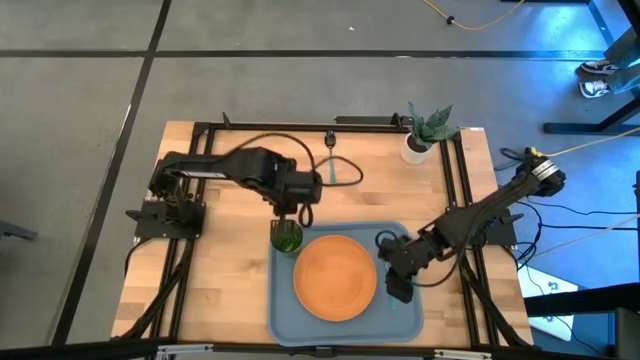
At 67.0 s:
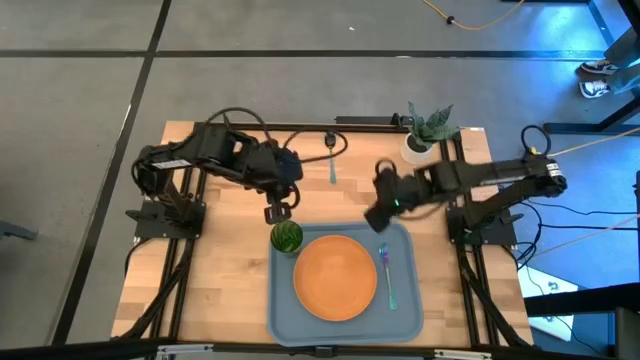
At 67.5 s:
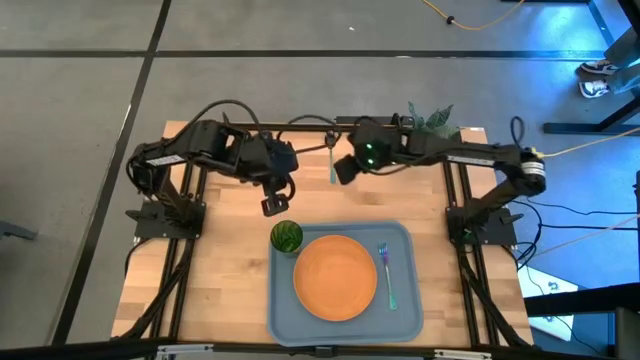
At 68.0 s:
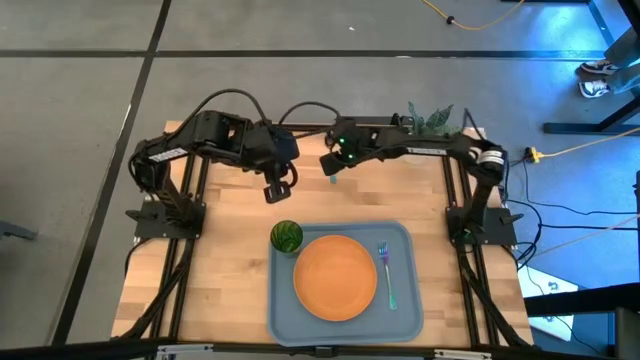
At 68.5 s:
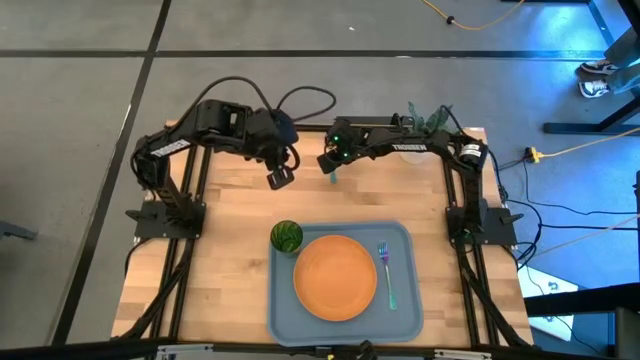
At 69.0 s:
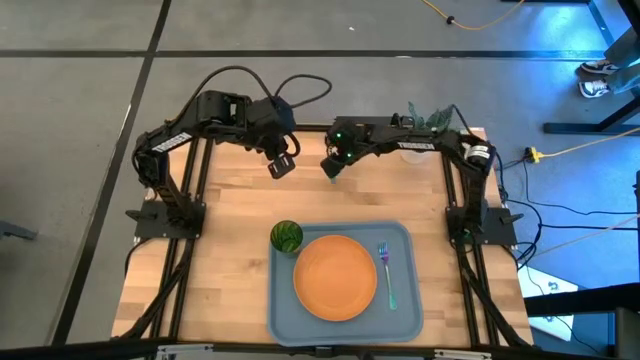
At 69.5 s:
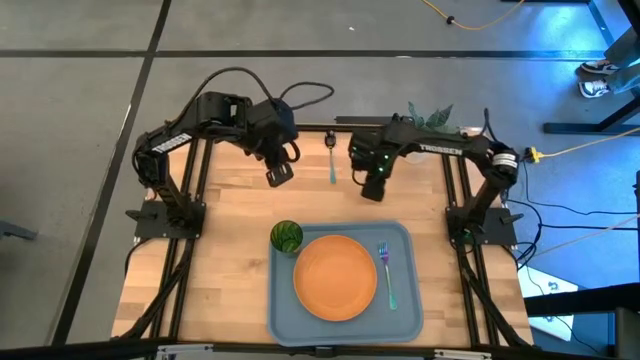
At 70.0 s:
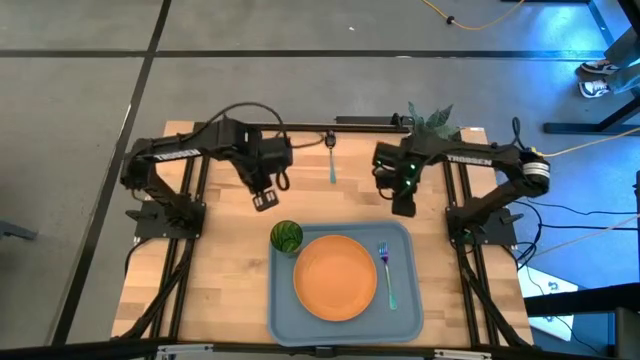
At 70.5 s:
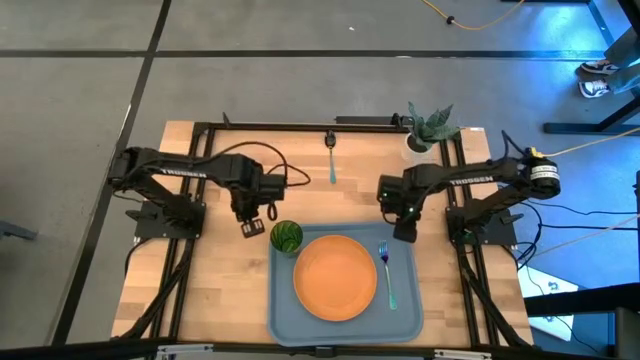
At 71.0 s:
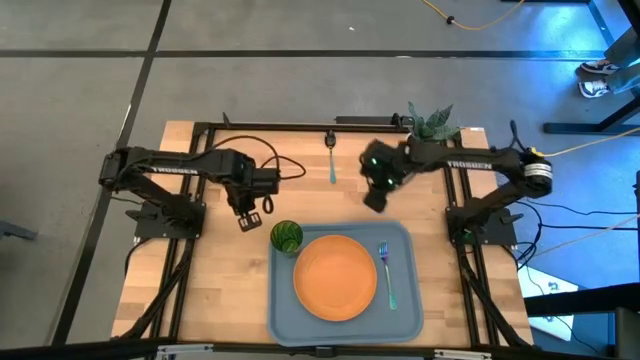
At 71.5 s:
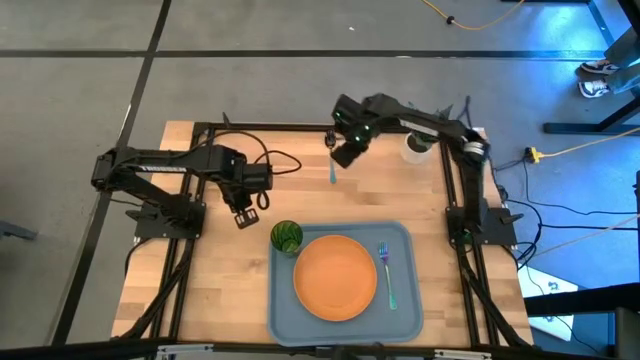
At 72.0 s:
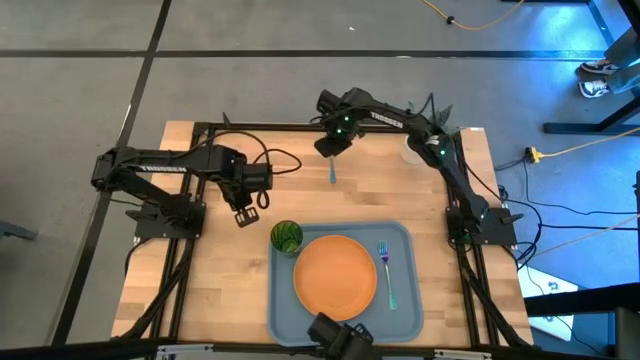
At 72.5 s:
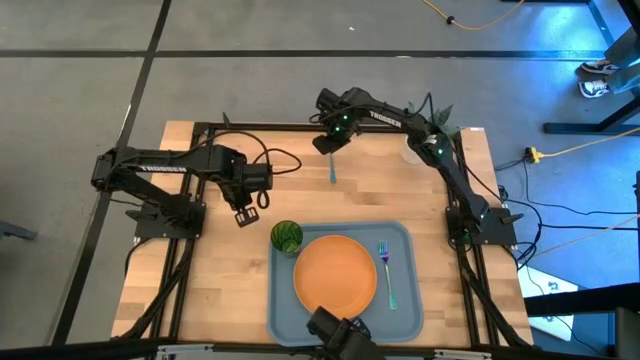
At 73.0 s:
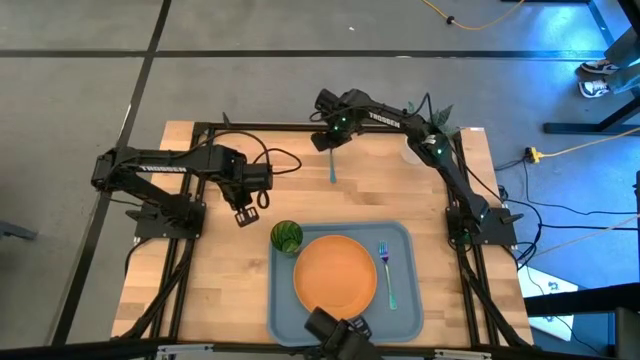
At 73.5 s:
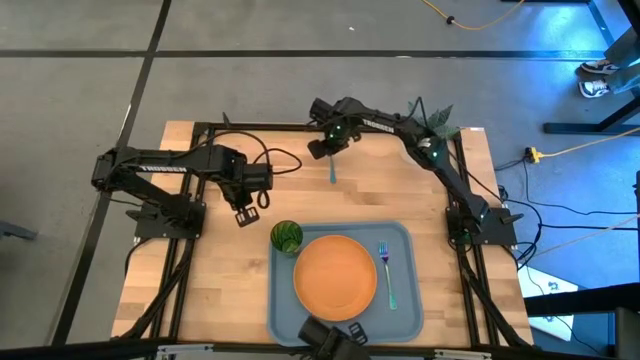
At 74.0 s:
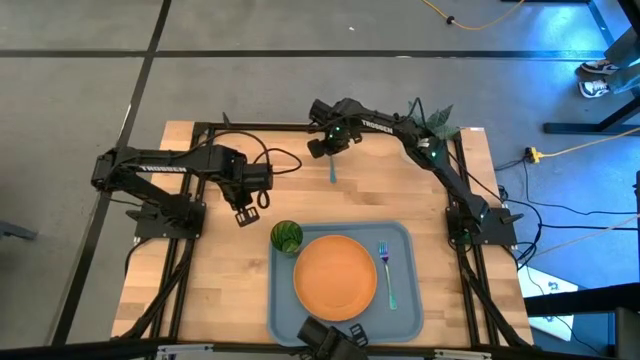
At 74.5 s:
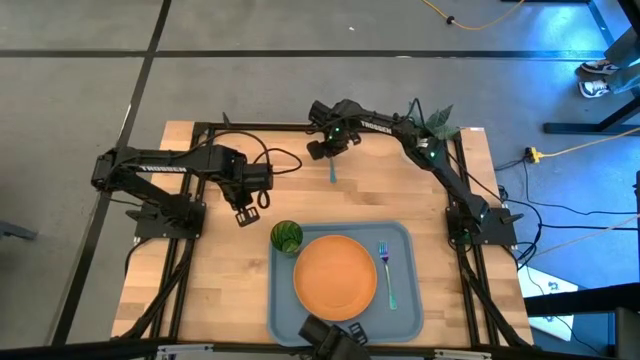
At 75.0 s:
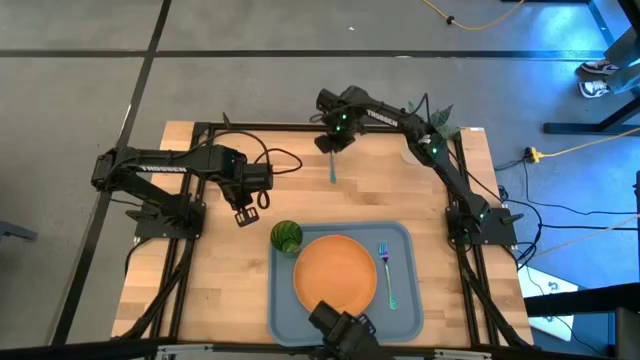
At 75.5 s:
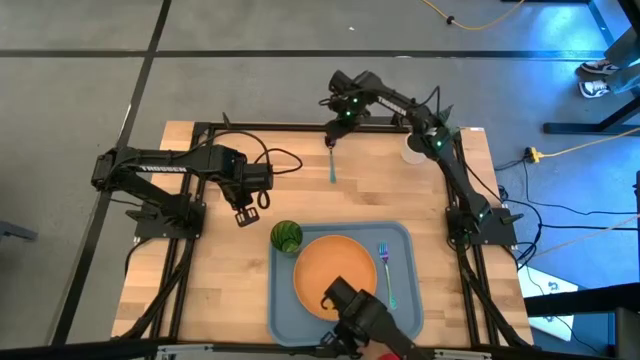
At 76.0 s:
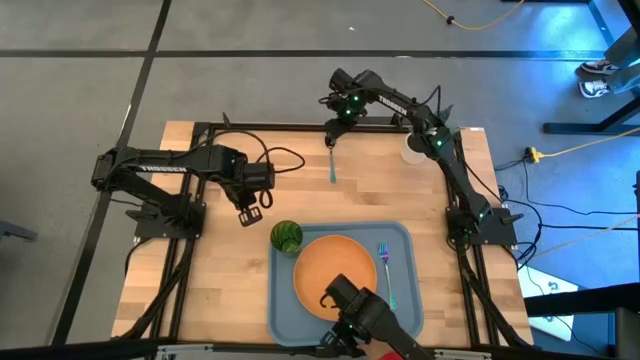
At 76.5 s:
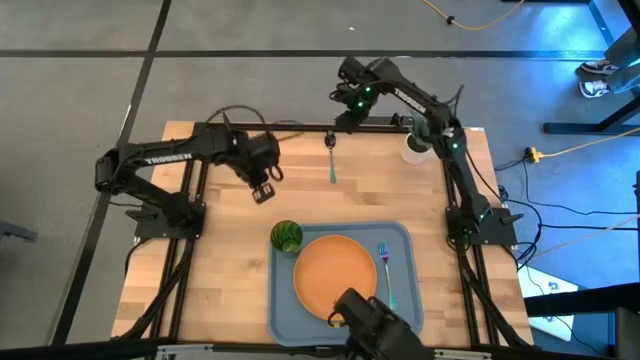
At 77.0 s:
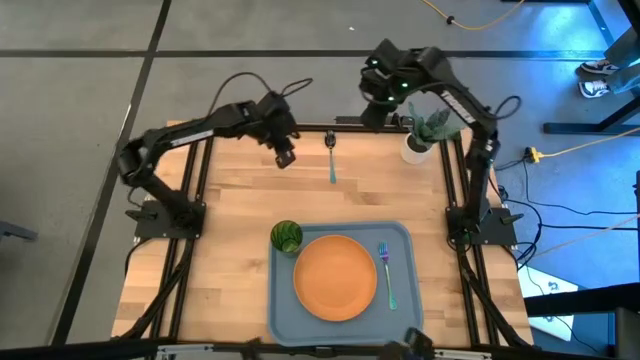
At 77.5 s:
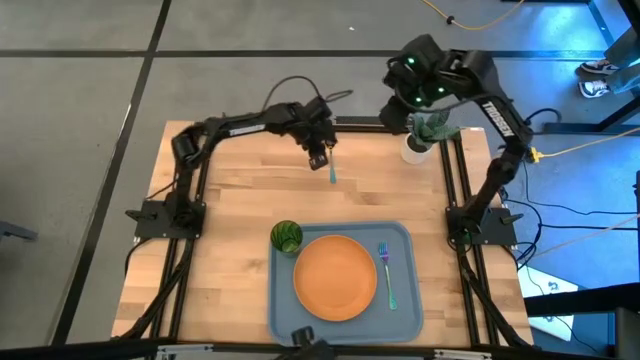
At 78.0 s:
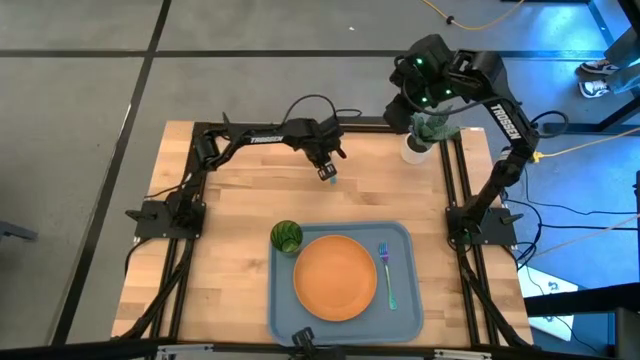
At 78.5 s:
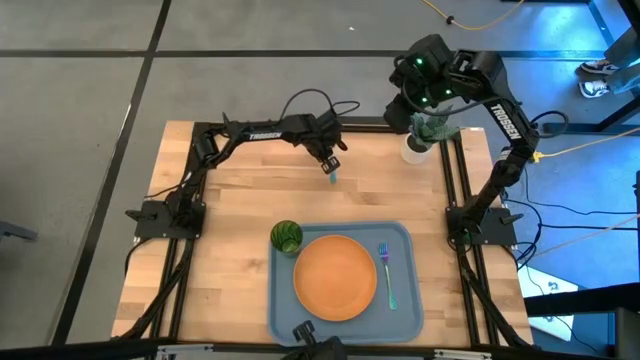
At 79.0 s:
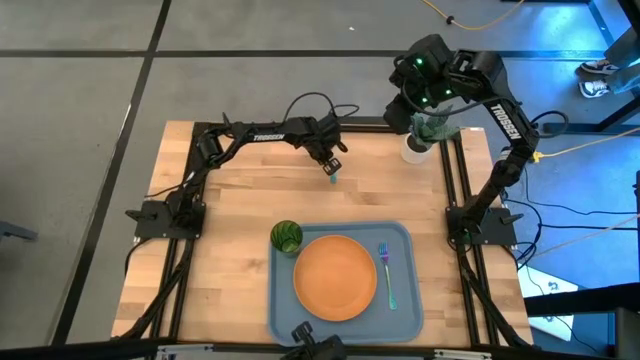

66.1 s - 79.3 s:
Task: Pick and place plate/cup/fork/spoon on tray
Put the blue spoon on the right side of the green fork on the gray serving tray

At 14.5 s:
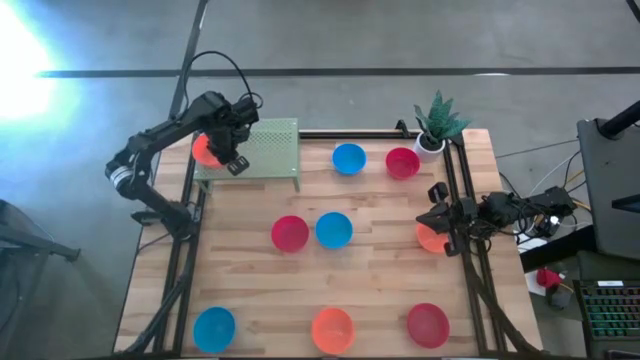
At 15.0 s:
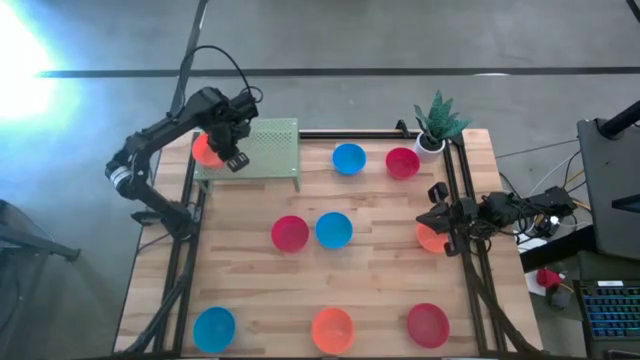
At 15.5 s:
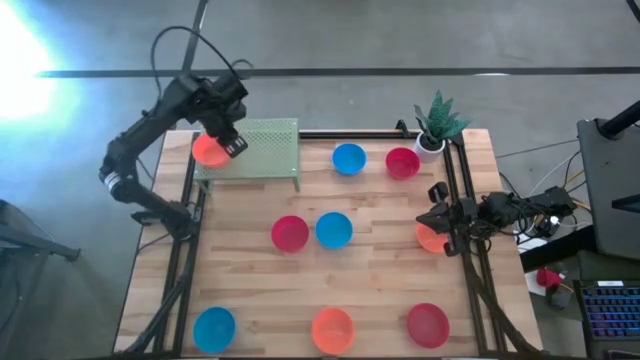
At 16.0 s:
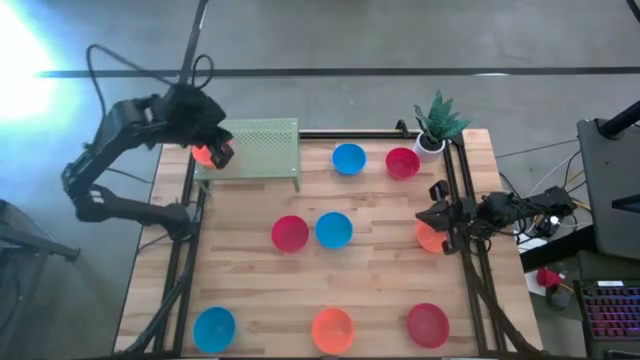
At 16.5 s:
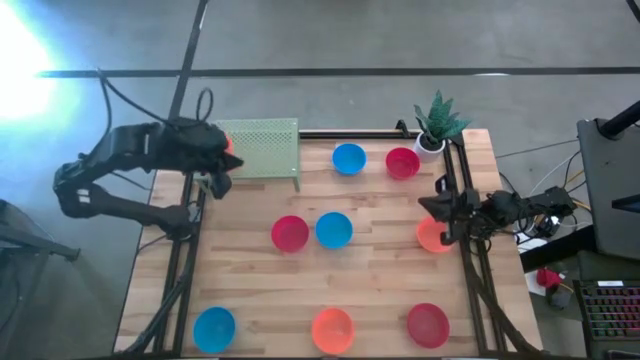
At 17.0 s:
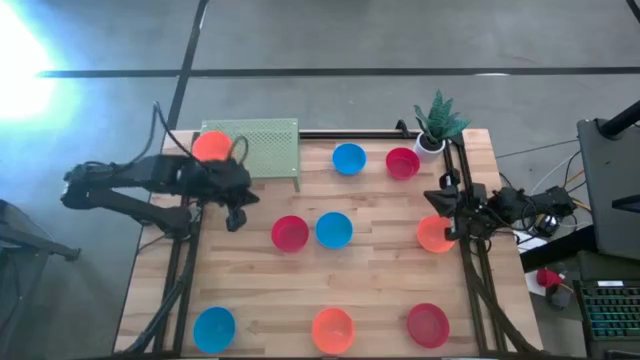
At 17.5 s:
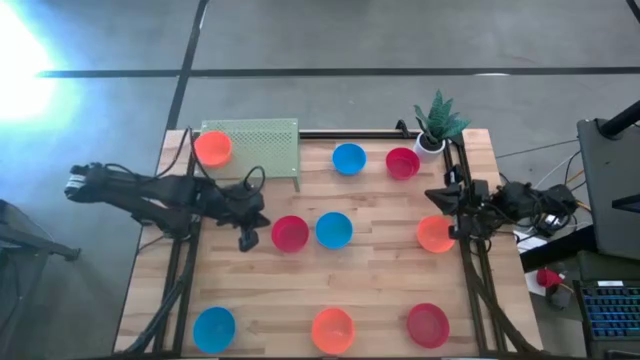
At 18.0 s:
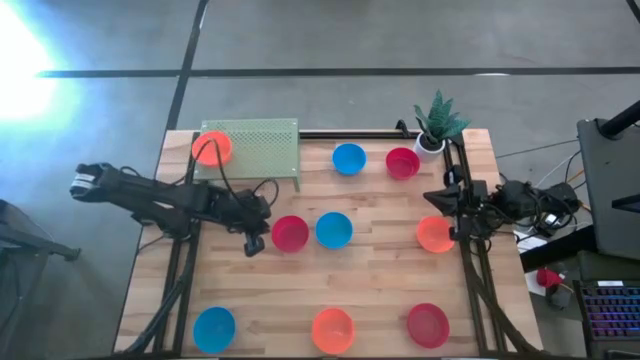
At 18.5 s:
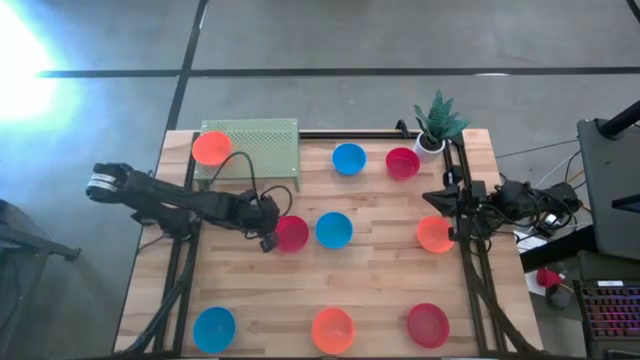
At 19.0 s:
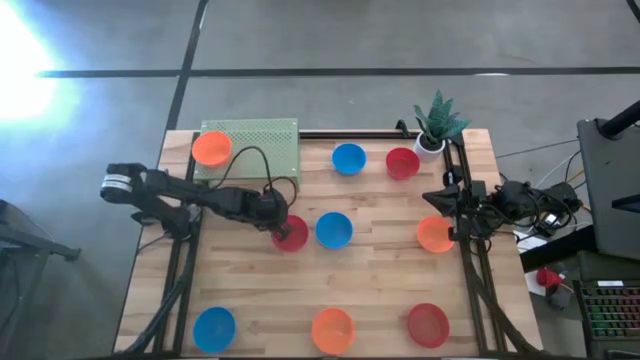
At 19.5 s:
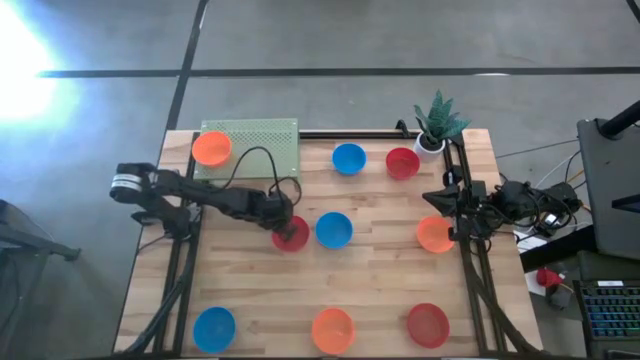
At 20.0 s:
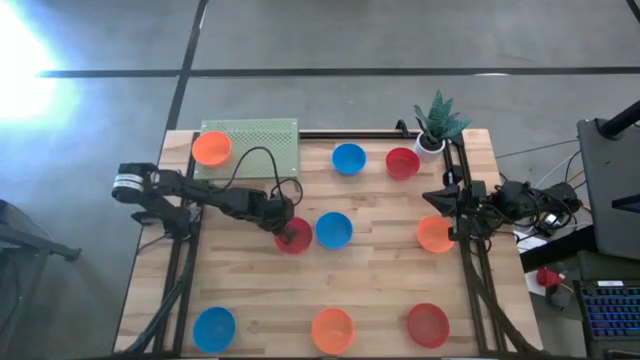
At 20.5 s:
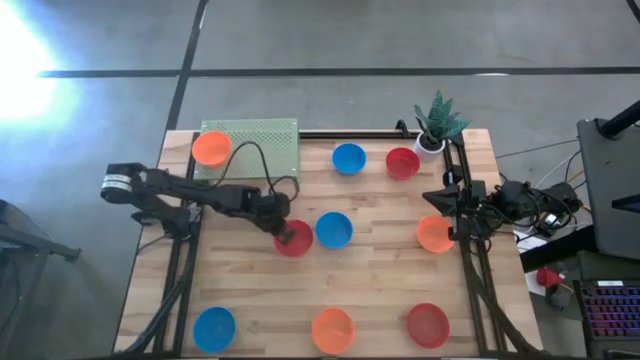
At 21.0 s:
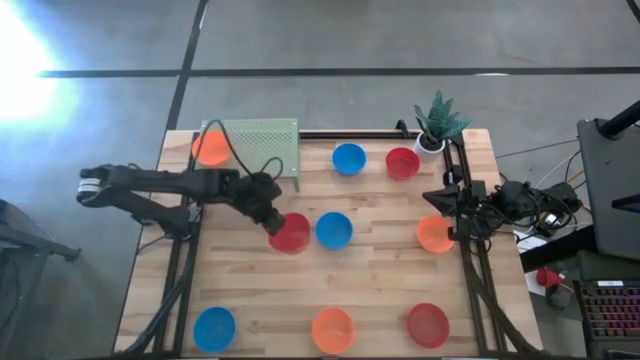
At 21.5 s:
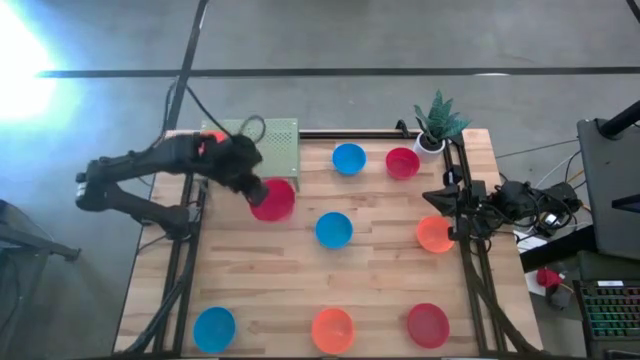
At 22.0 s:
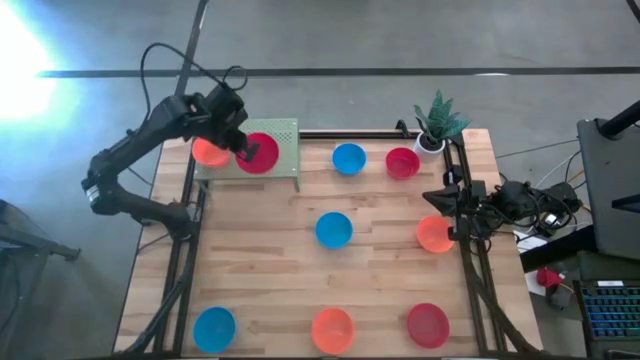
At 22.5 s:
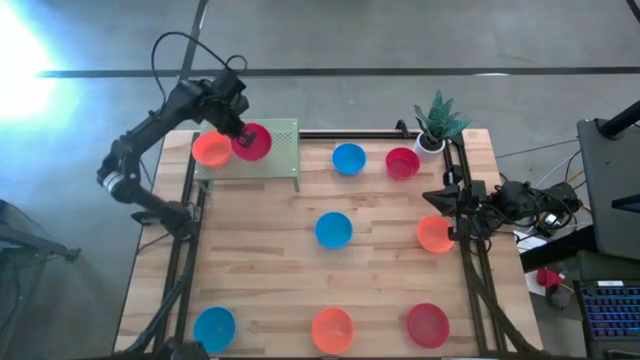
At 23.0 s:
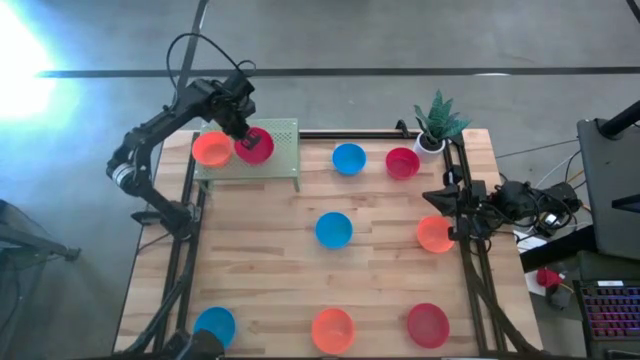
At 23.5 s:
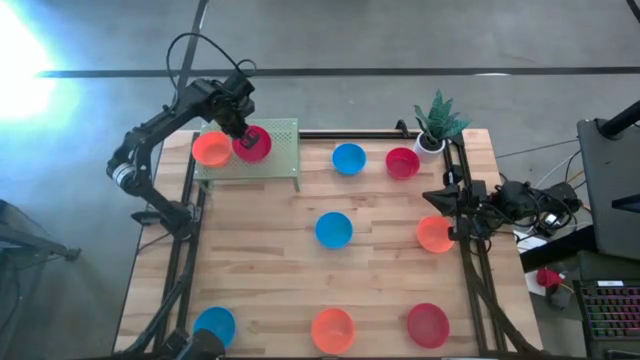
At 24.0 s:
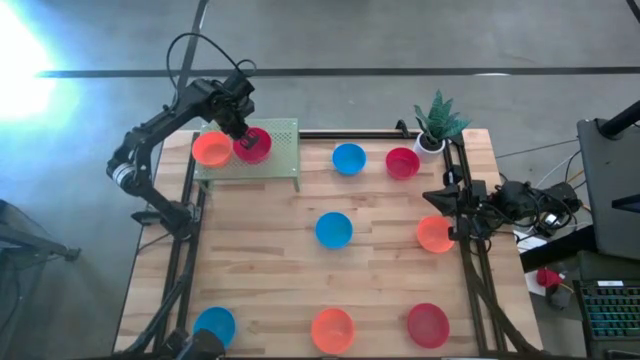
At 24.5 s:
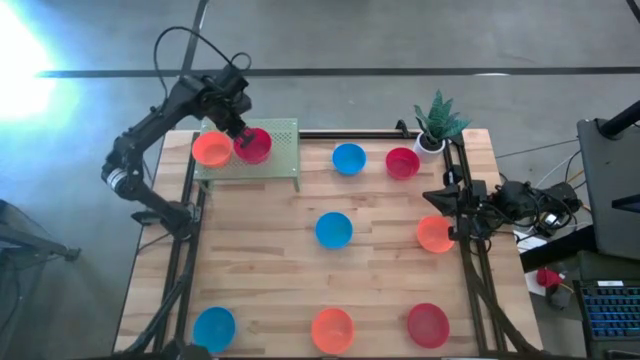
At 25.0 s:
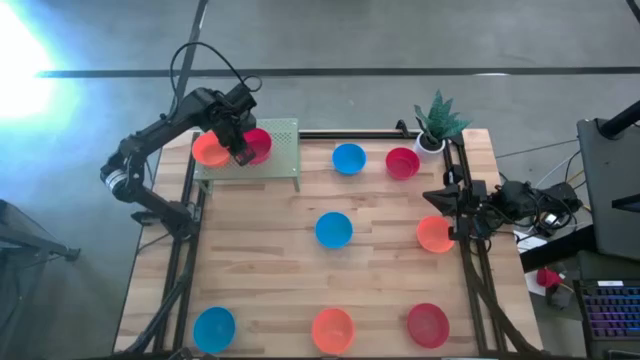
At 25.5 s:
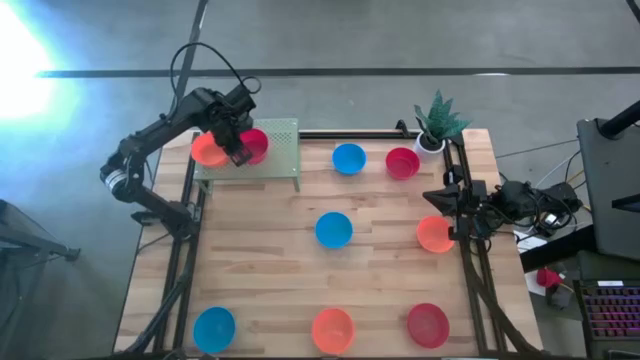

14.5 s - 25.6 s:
Task: Pick & Place Mini bowls
Put the left red bowl on the shelf
